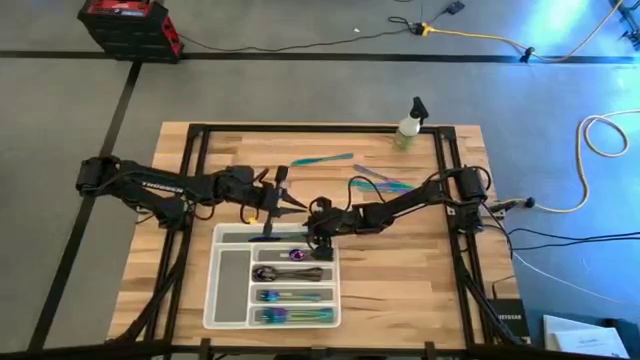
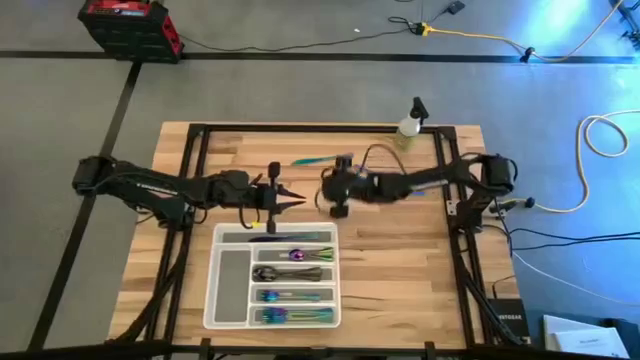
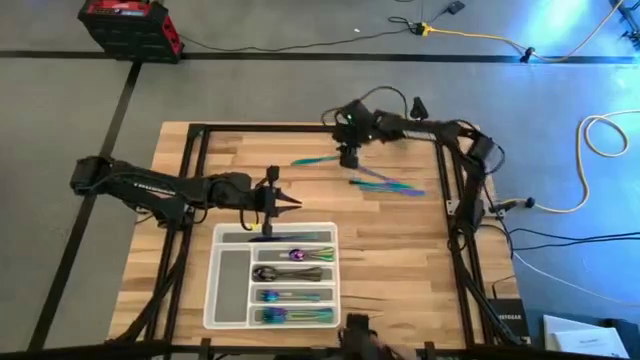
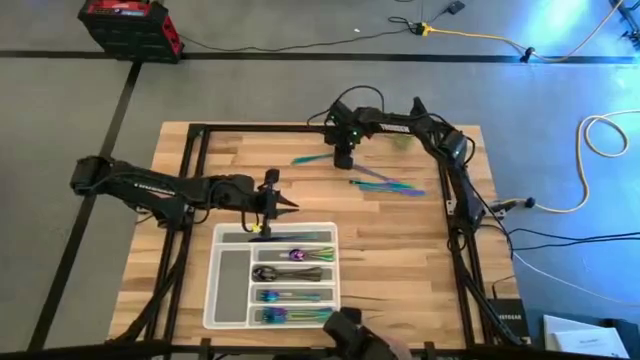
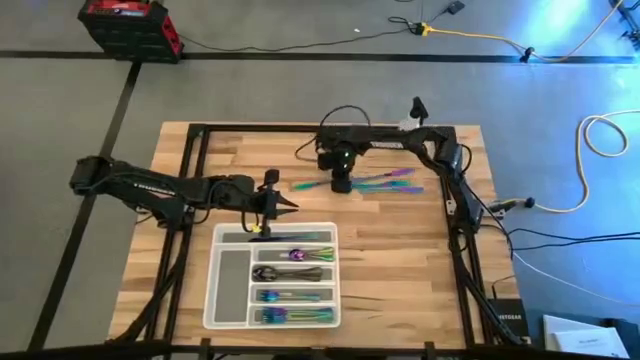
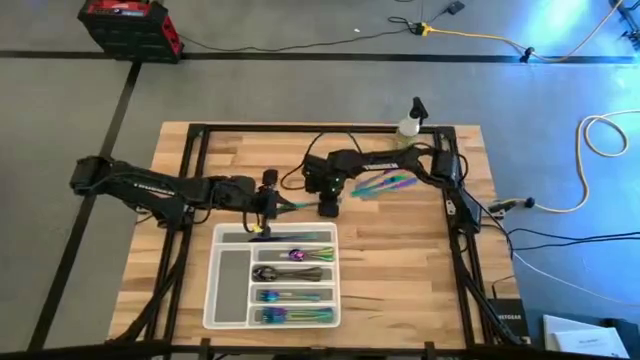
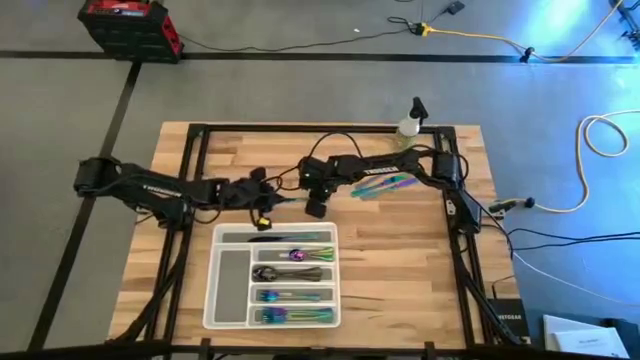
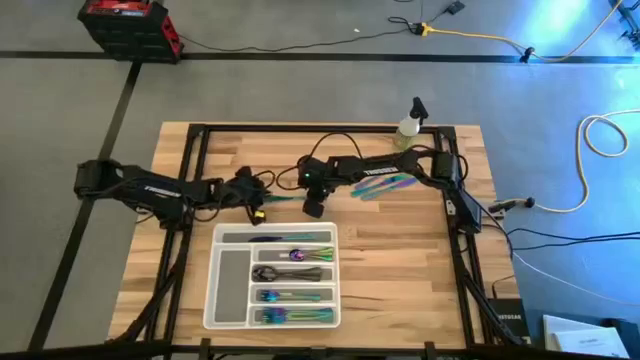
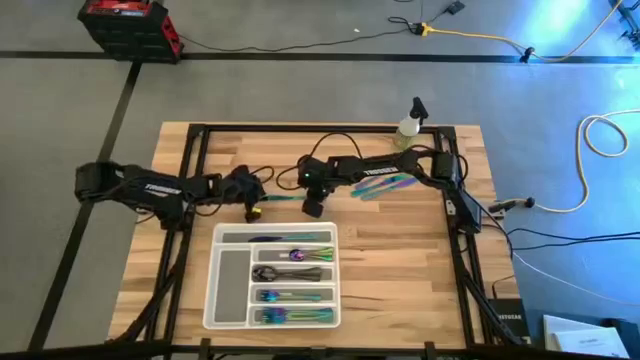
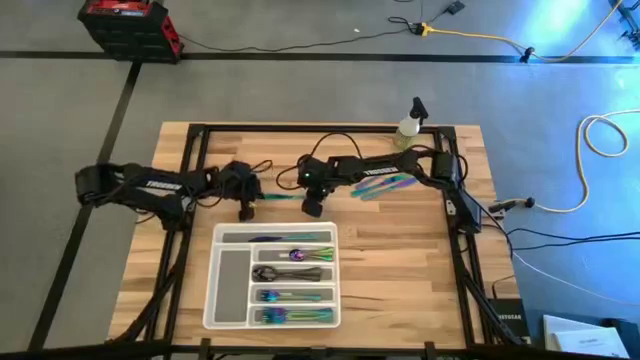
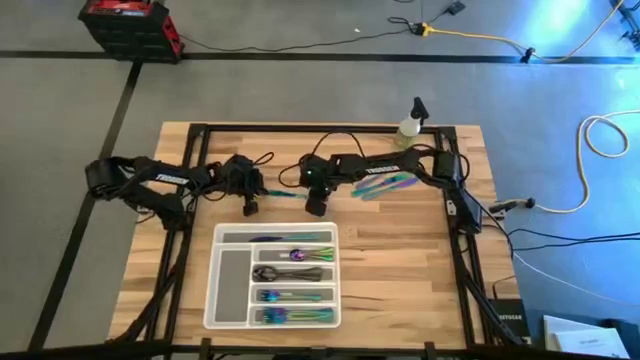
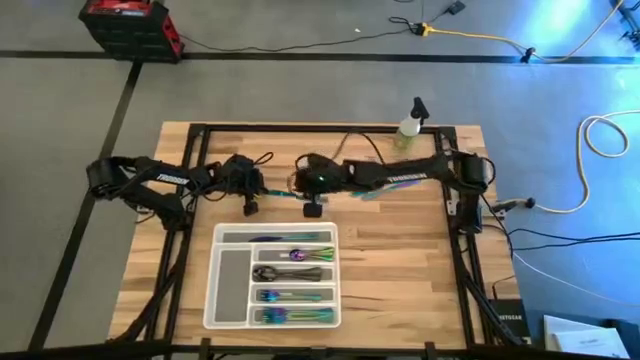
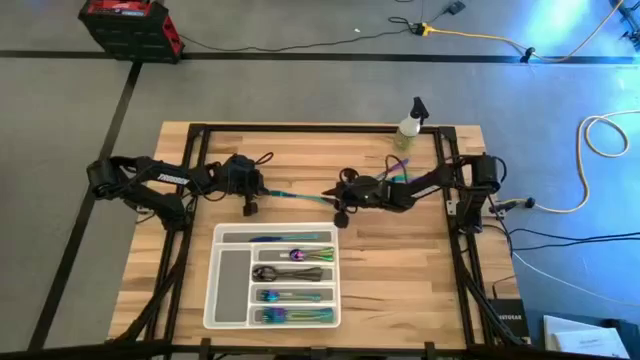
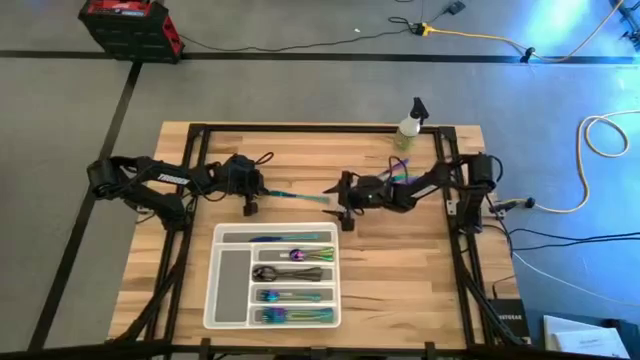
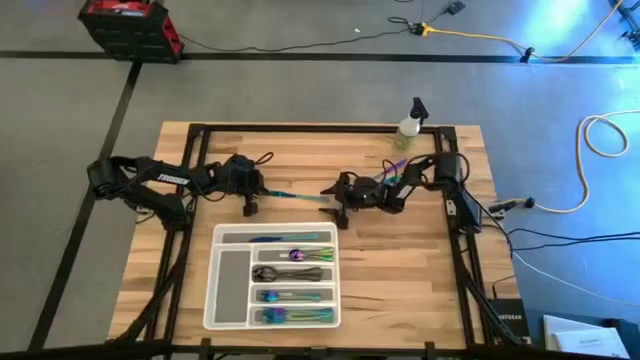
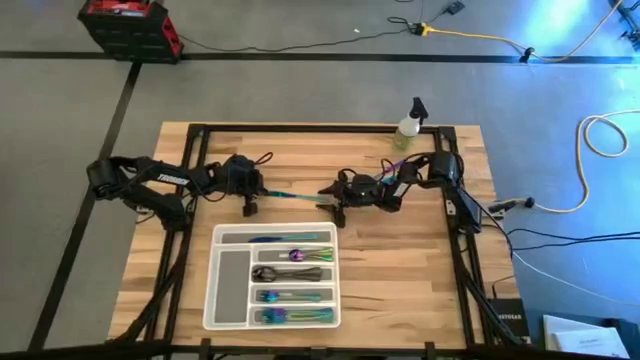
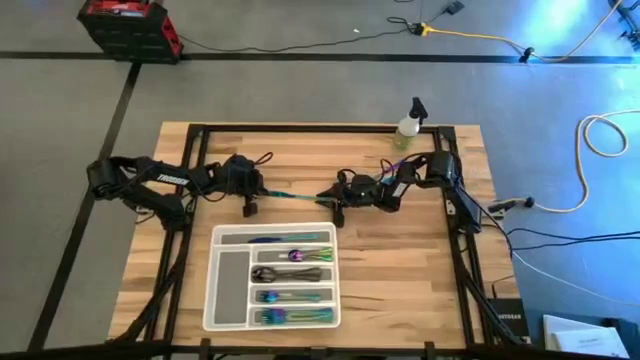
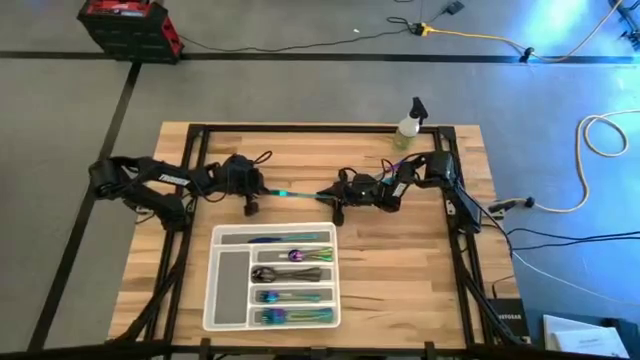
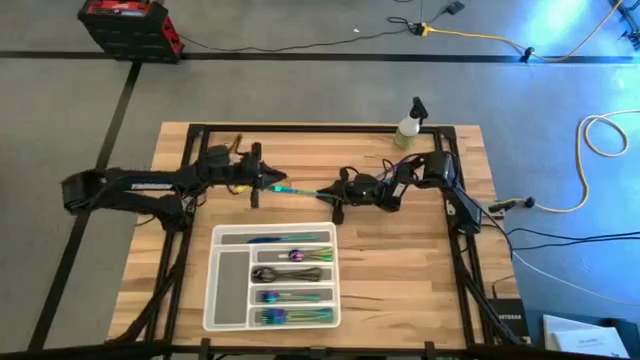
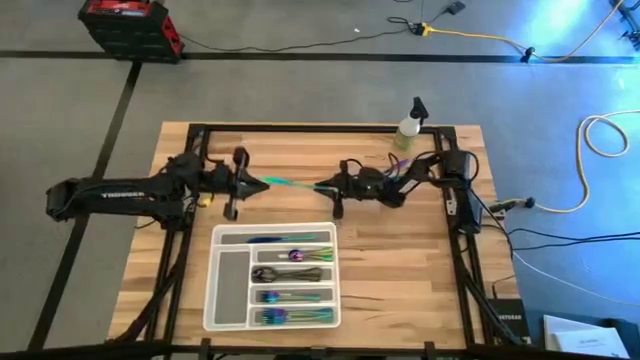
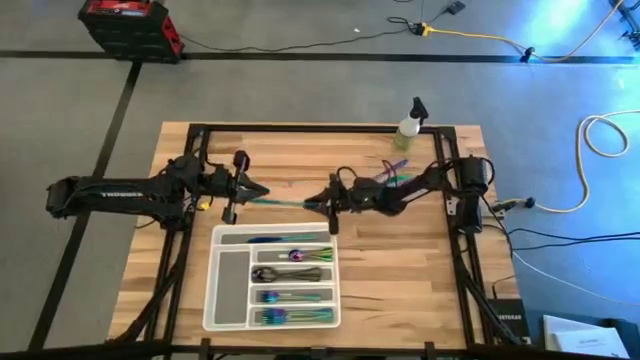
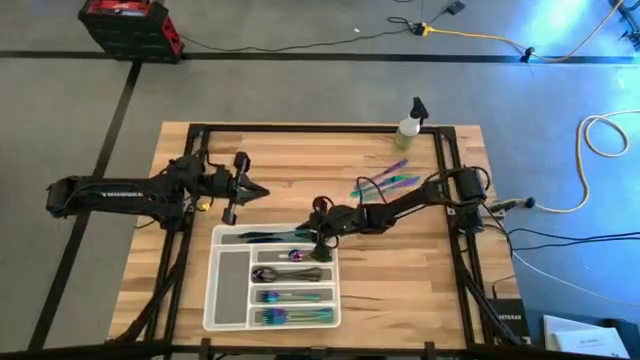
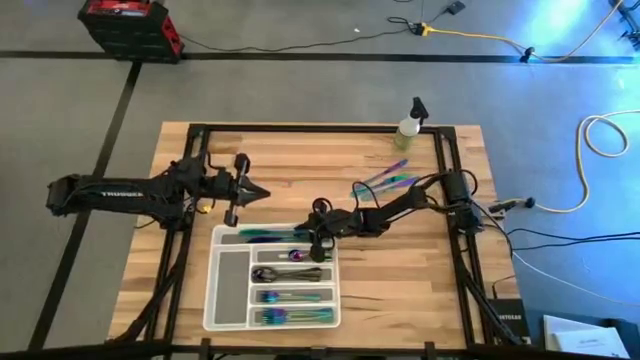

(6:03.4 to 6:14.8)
Task: Sort silverware
Put the blue table knife into the white silverware tray

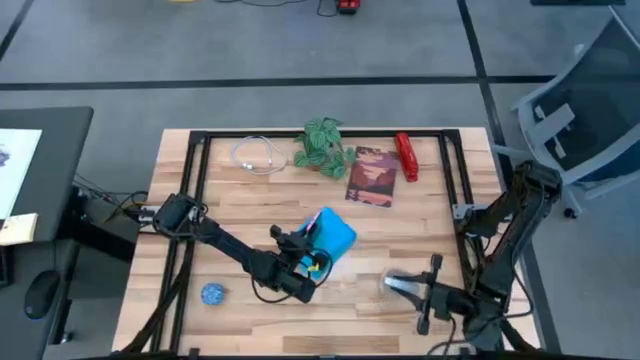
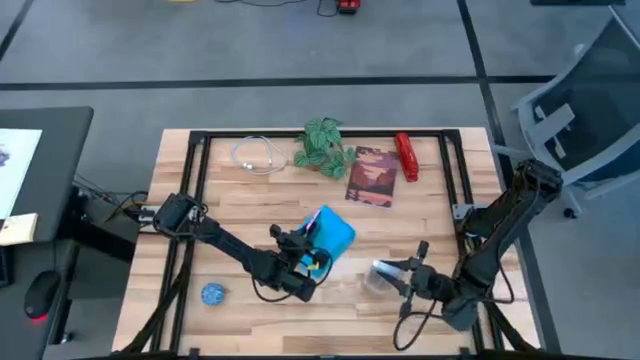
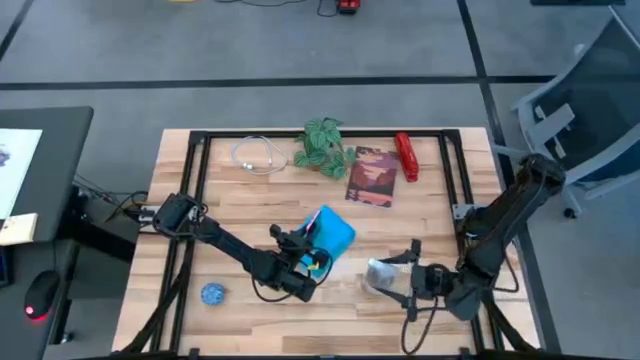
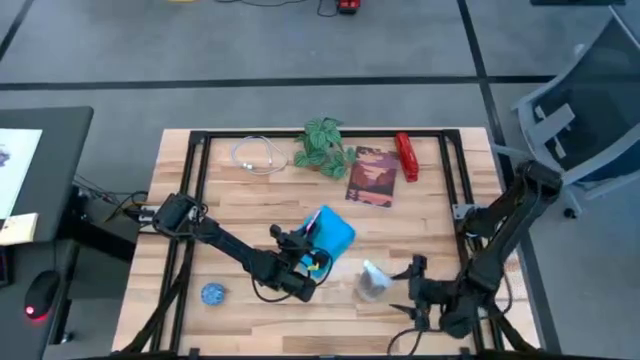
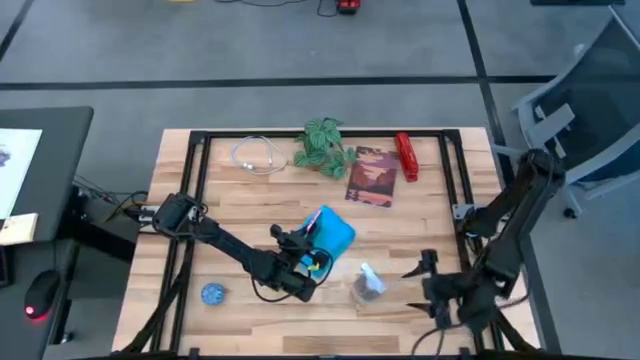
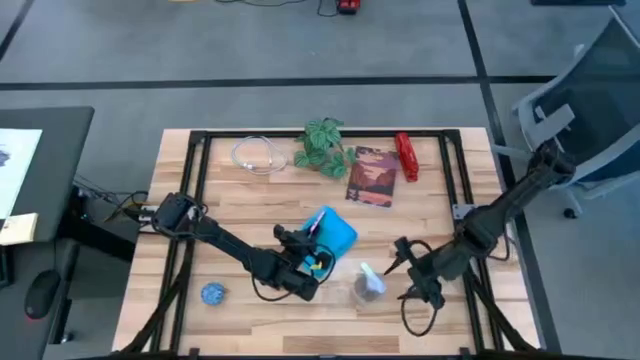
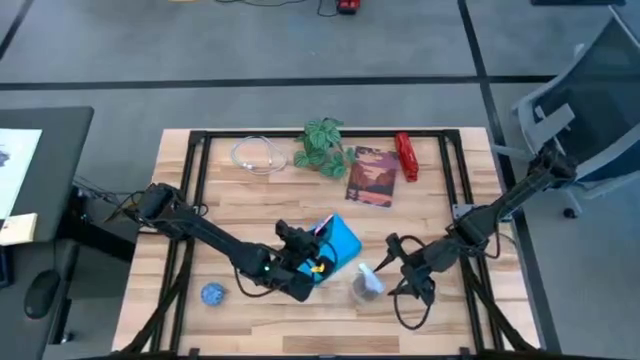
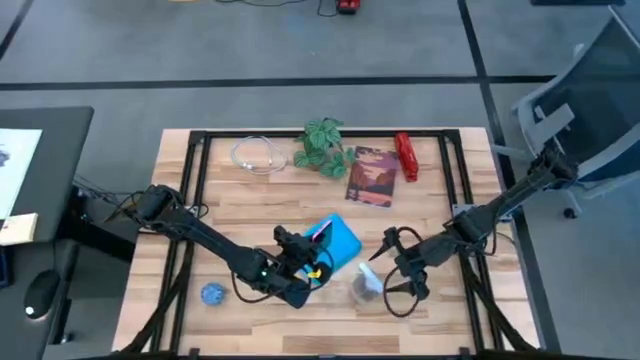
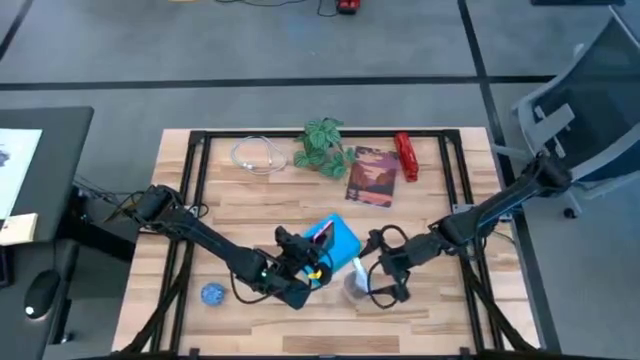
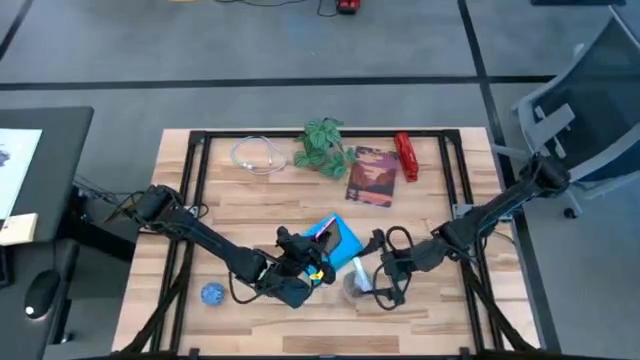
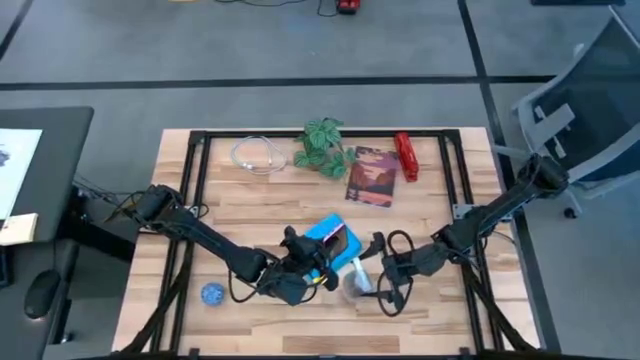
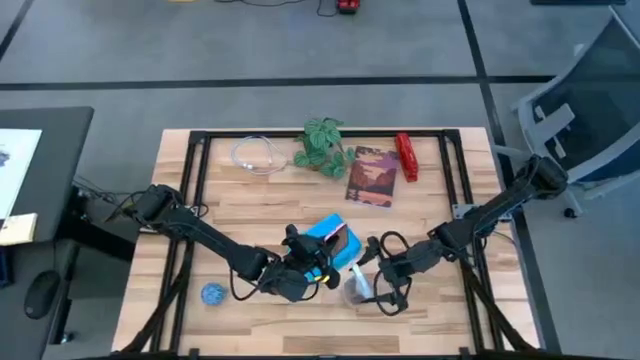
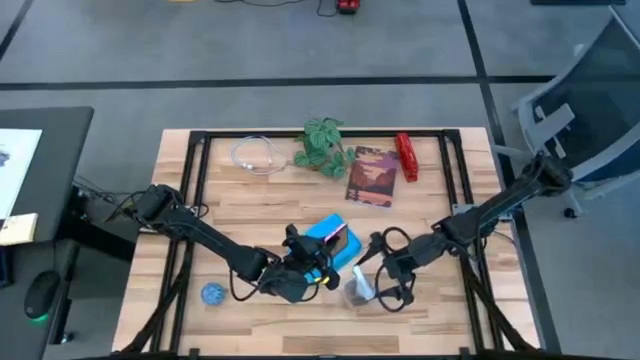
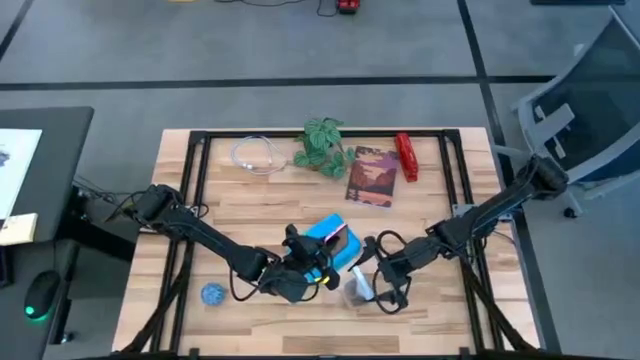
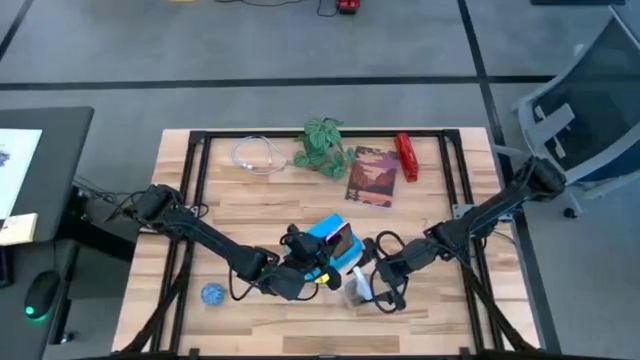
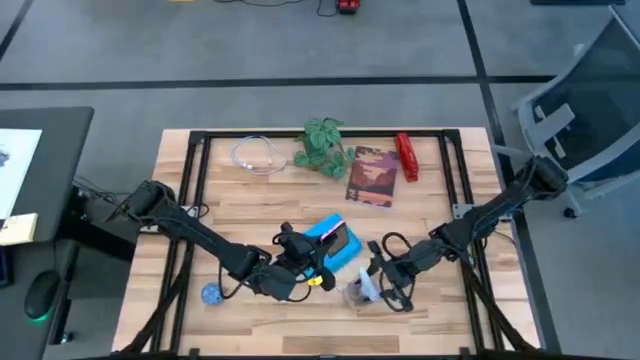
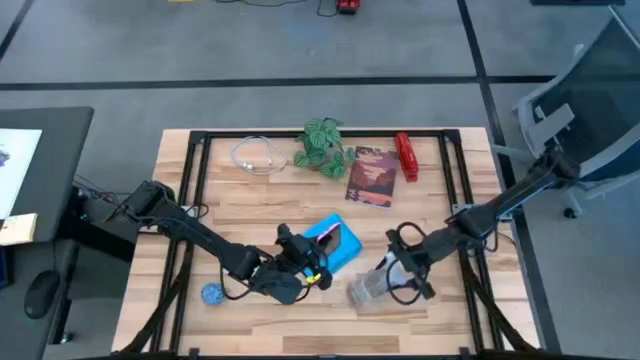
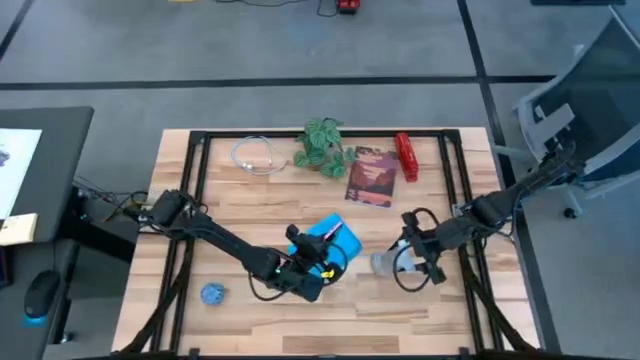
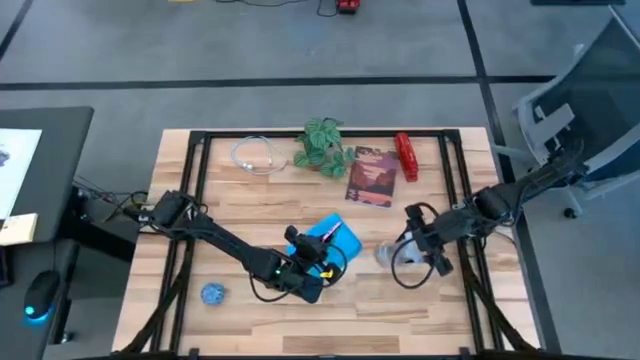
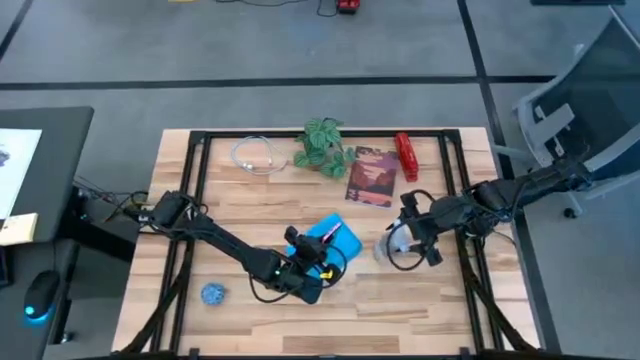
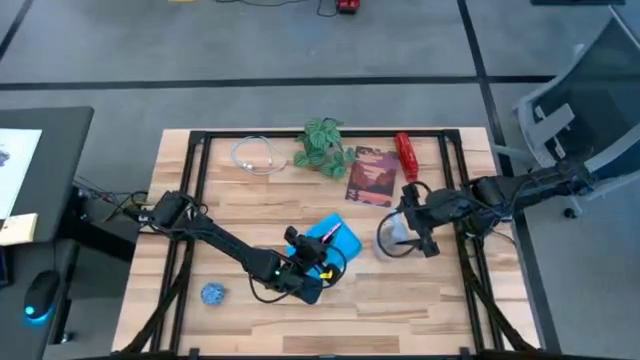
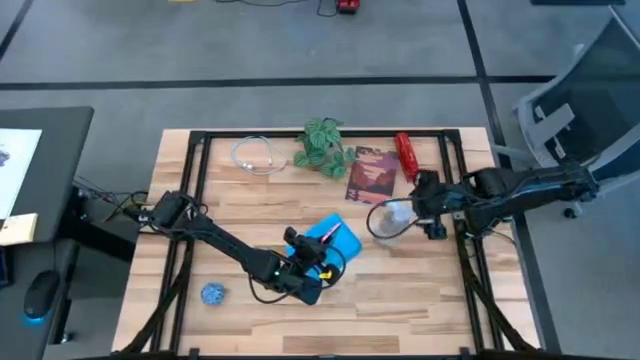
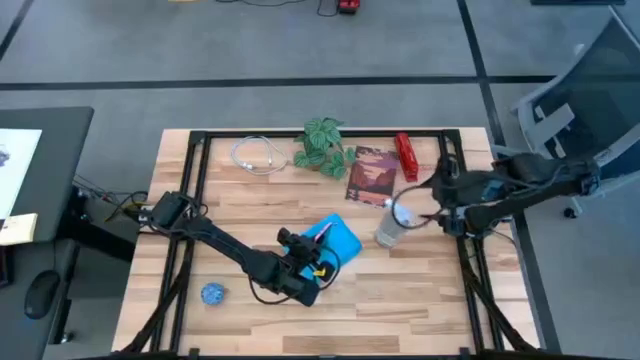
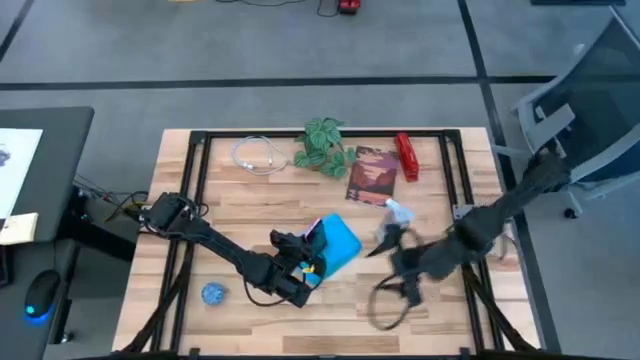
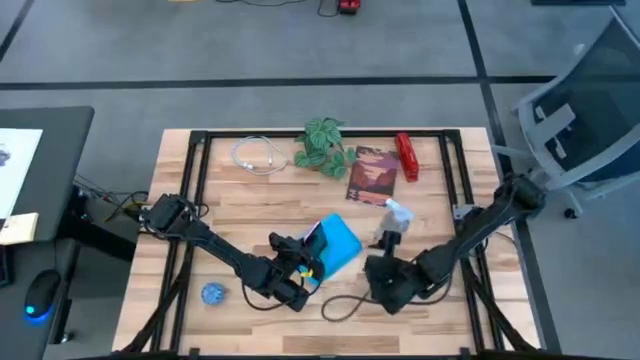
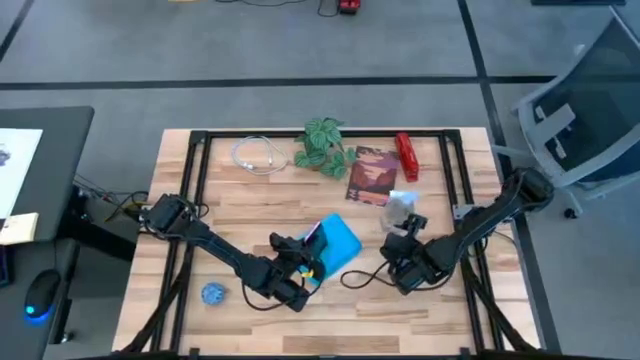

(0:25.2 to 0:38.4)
Task: Apply microfiber cloth
Spray the front of the pink cellphone with the transparent spray bottle
